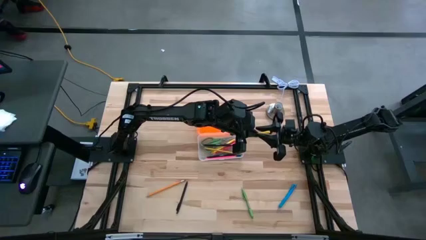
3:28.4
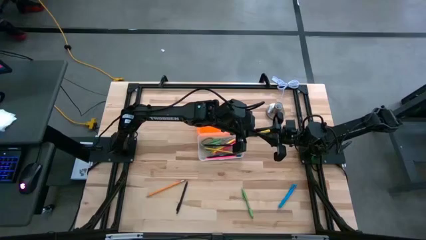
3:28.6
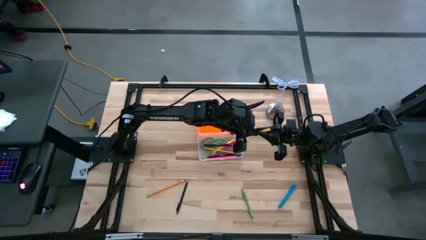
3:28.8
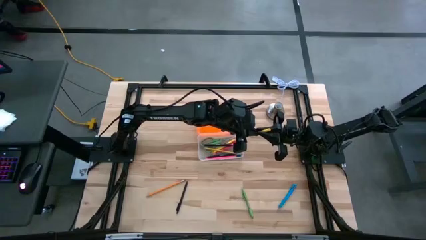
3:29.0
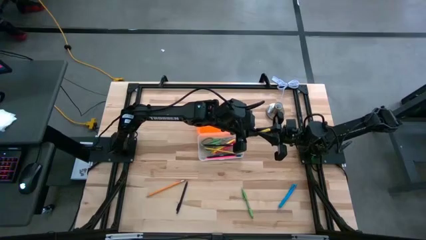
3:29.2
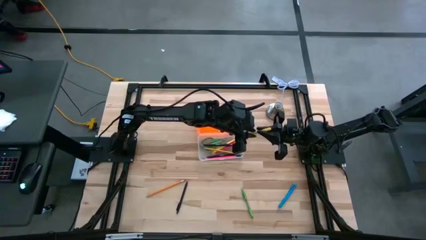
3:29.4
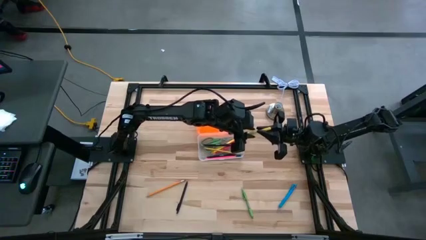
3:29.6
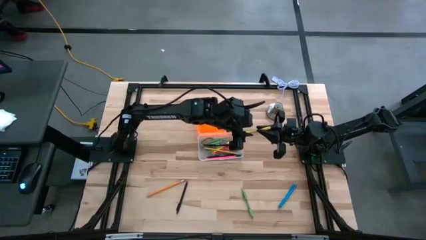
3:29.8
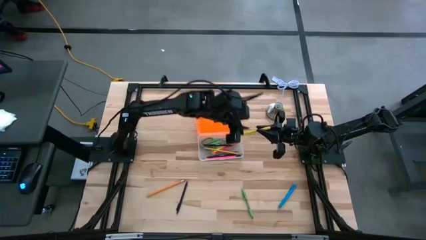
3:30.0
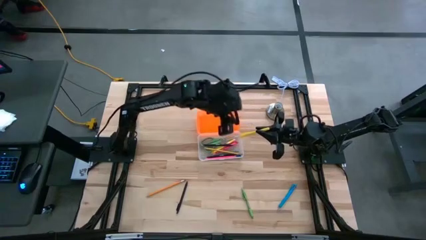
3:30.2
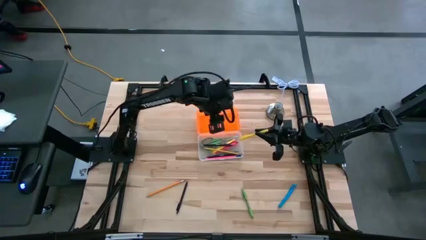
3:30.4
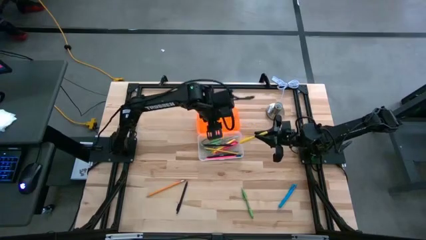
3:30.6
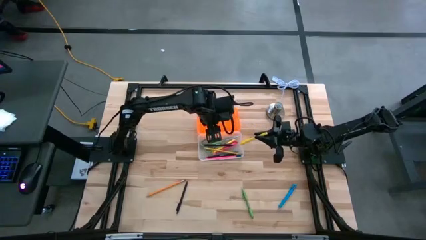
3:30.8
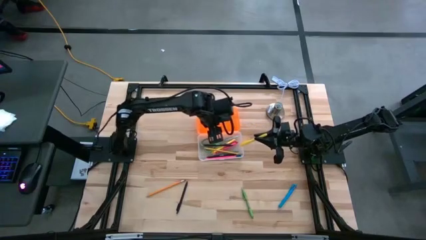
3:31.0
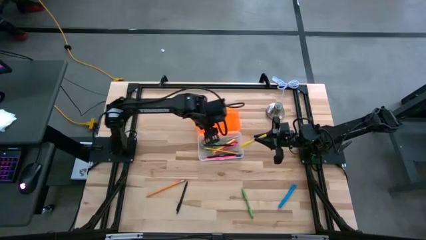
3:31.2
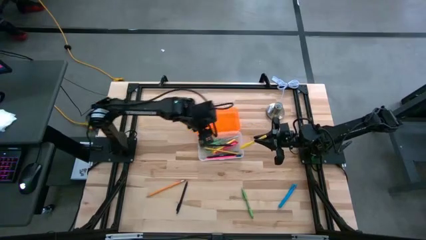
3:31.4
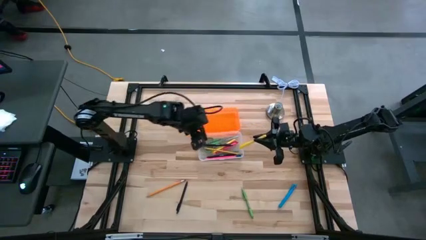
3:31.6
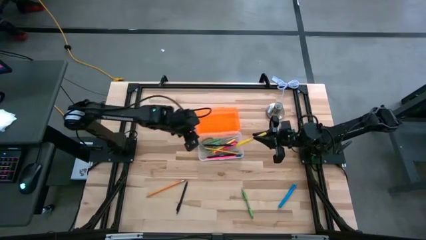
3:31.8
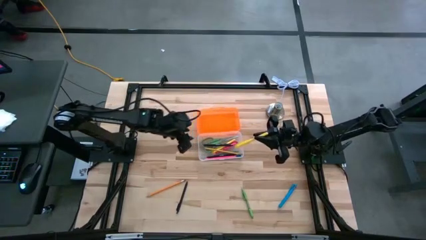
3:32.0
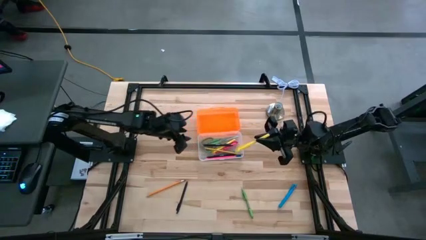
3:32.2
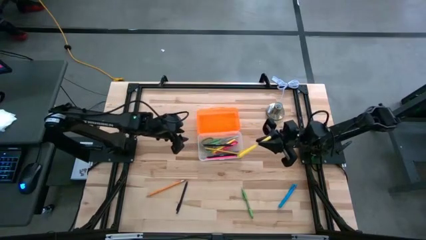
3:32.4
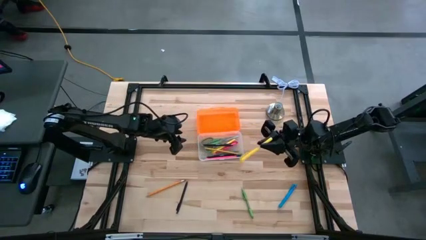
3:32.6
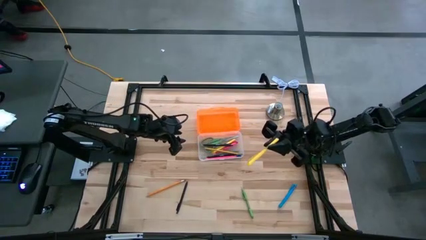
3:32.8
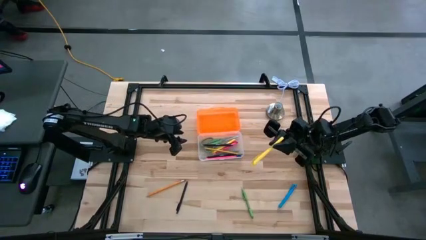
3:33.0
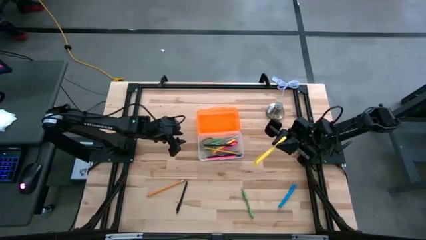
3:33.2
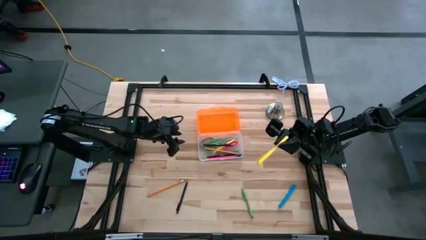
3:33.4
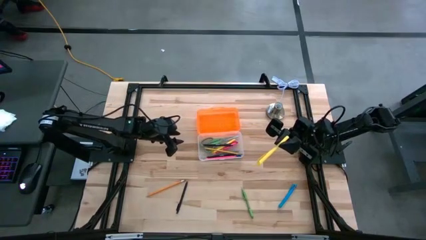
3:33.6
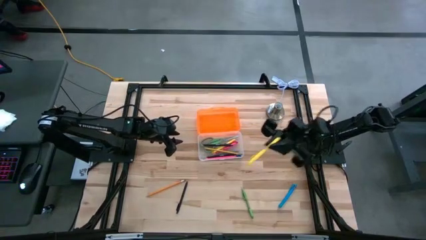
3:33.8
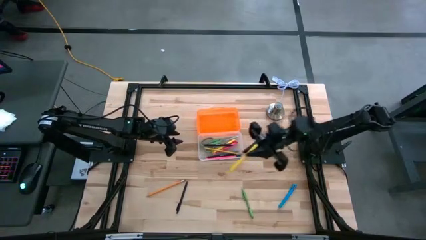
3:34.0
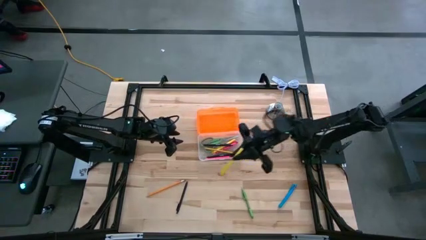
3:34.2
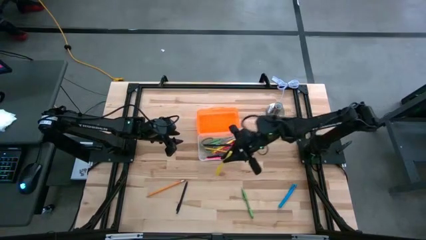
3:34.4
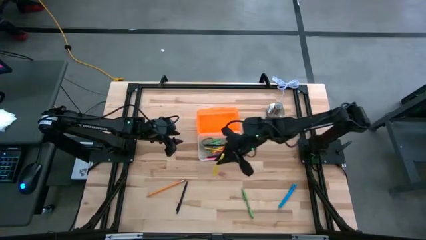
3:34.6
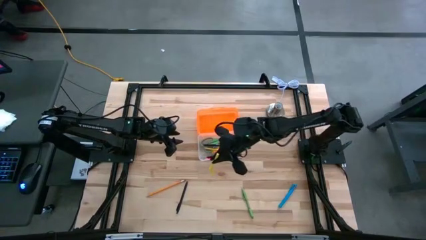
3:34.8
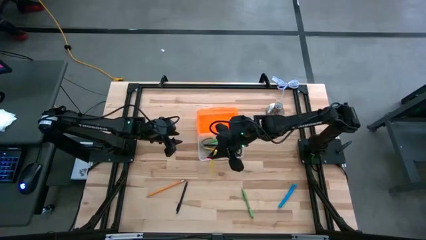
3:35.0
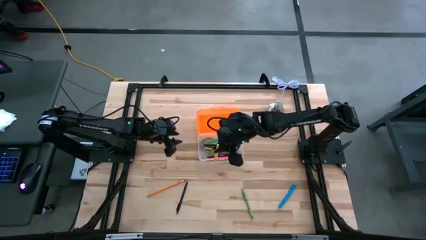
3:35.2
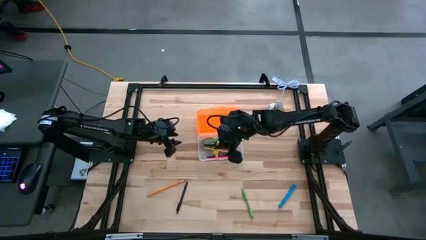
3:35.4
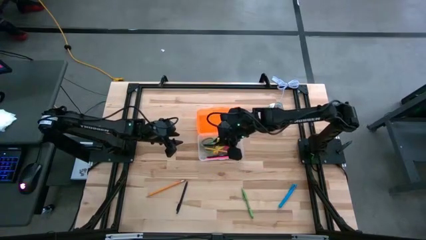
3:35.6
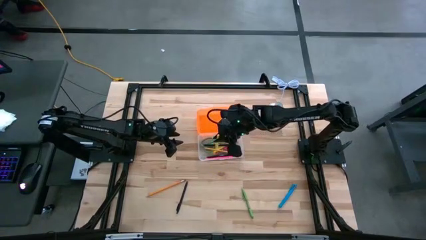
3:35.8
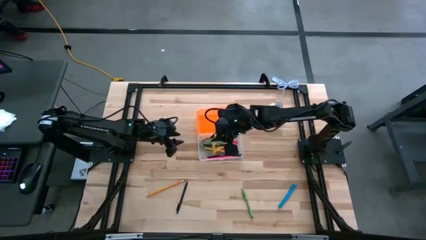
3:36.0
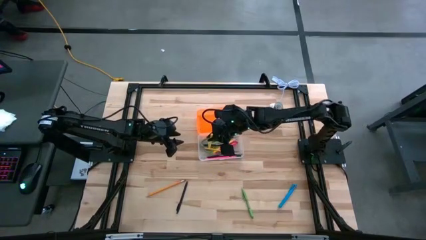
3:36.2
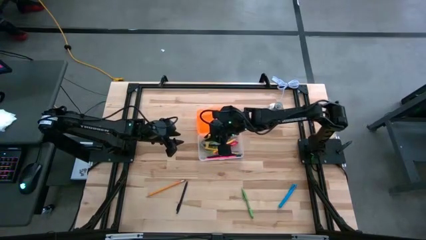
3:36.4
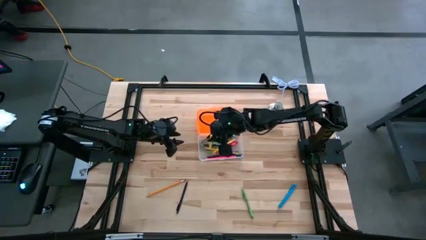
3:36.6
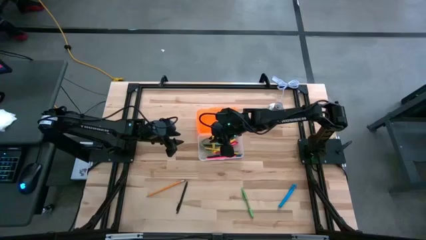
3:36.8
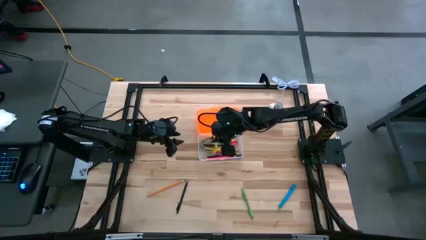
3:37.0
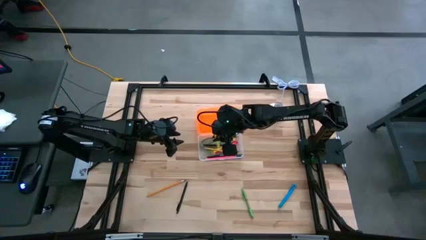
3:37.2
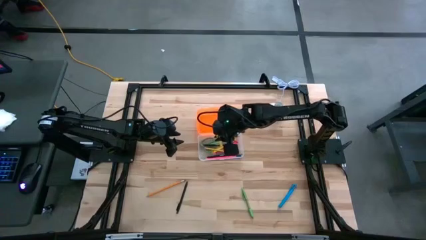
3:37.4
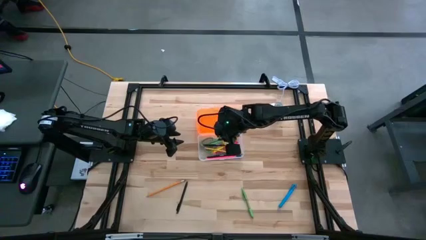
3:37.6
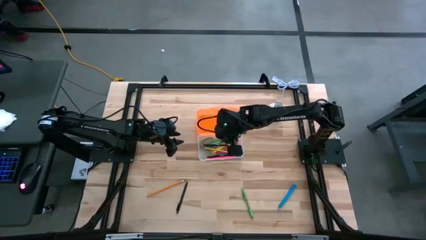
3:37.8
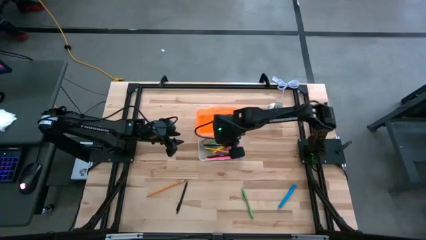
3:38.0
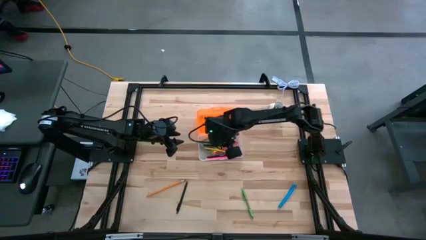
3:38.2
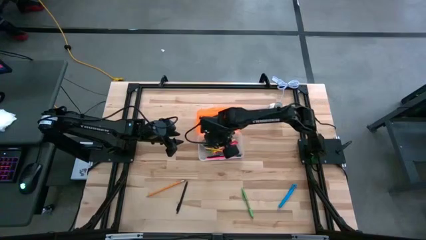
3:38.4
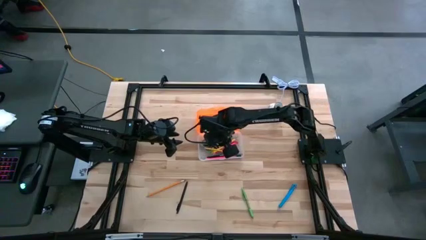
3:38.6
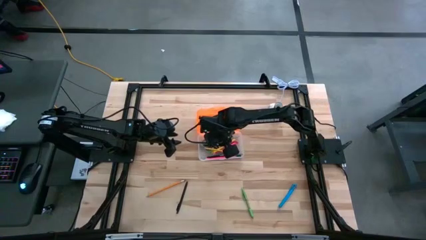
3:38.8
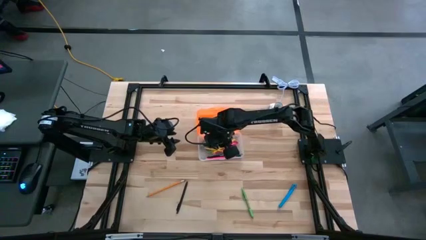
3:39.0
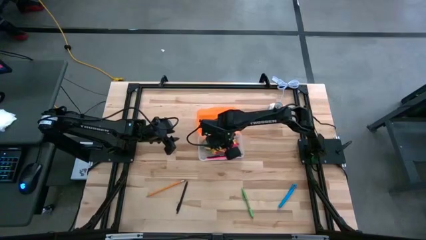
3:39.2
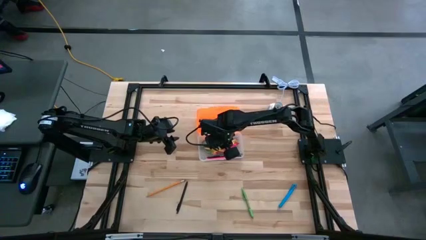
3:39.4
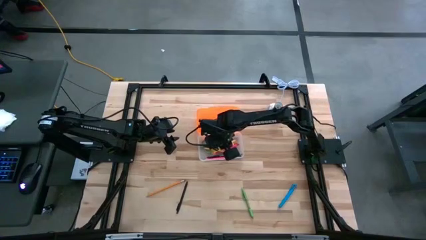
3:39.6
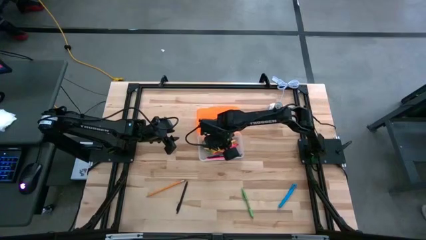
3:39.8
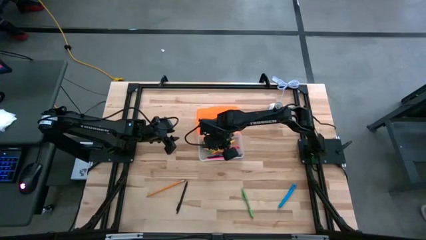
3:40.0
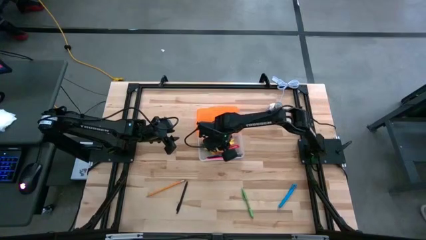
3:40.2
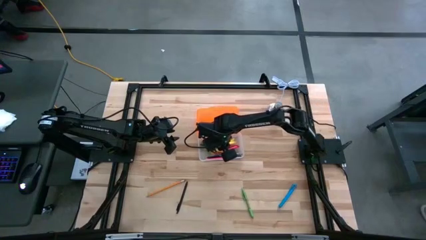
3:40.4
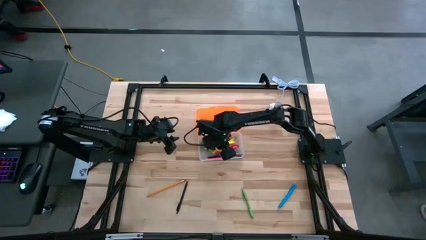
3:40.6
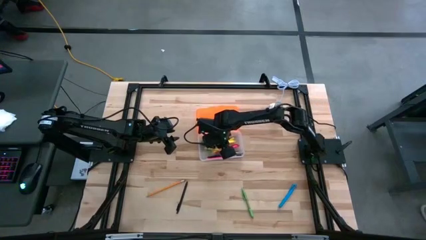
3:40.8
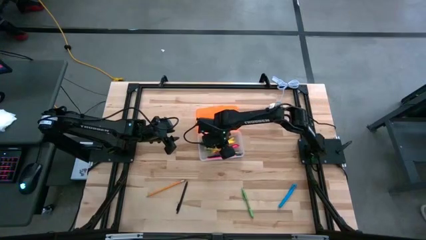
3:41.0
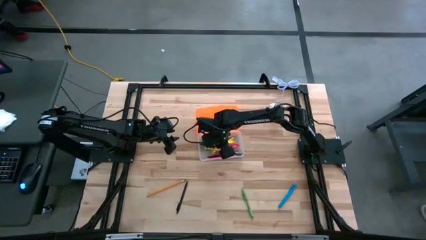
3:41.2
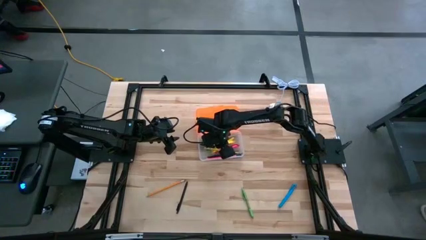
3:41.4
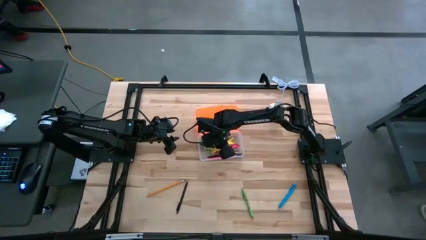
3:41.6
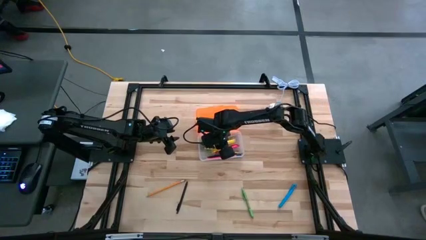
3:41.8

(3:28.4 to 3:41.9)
Task: Pick & place school supplies into a supply box
Put the yellow pen into the container

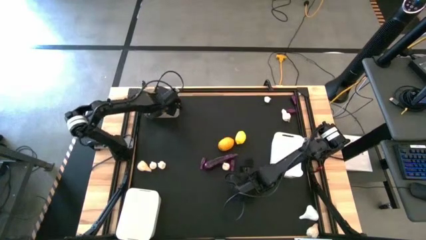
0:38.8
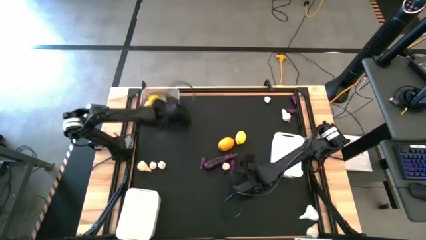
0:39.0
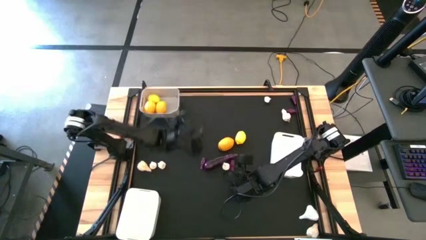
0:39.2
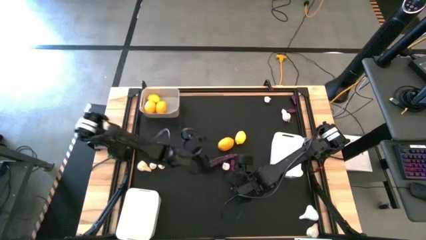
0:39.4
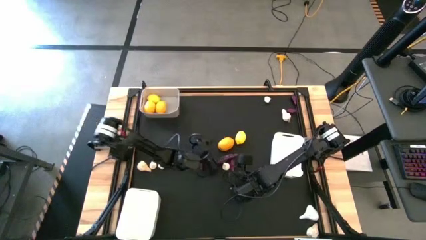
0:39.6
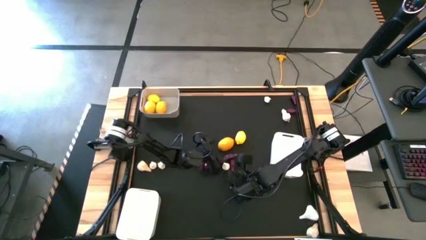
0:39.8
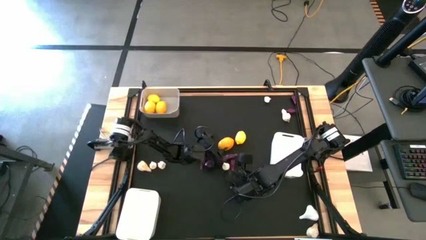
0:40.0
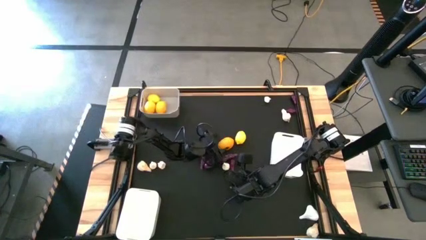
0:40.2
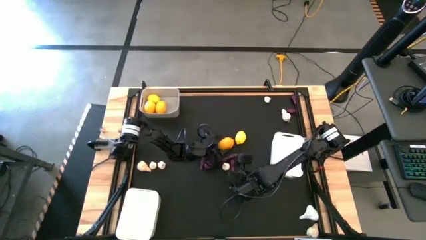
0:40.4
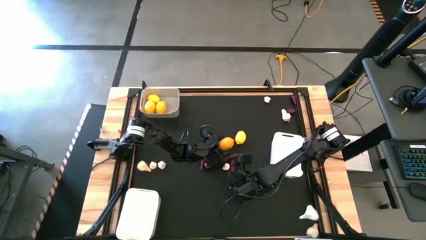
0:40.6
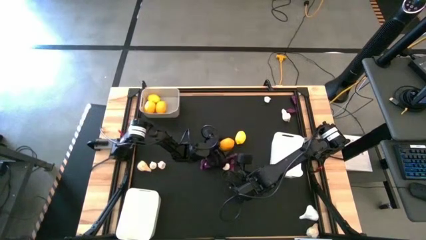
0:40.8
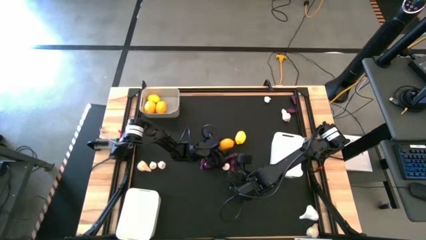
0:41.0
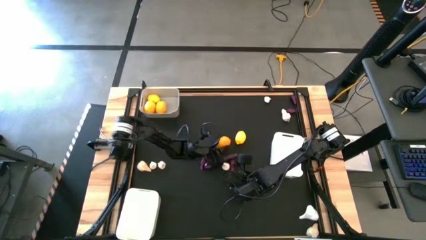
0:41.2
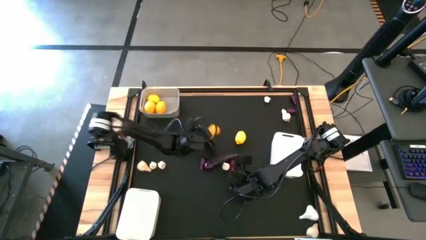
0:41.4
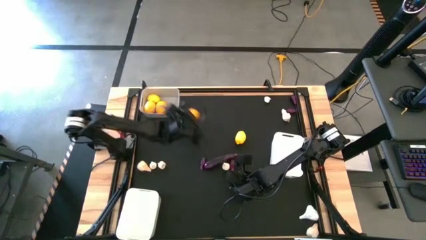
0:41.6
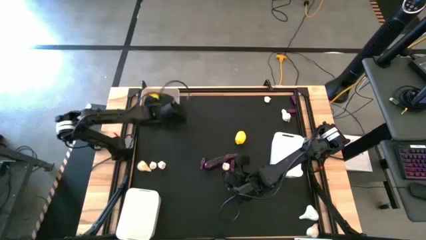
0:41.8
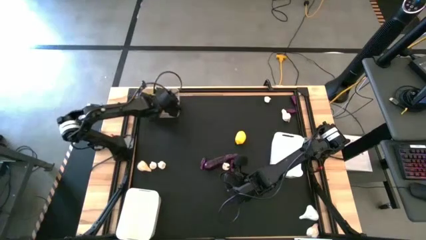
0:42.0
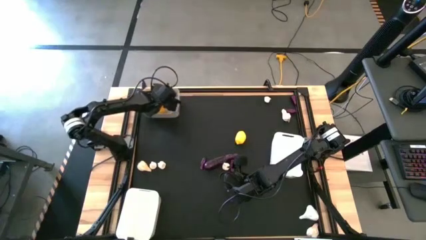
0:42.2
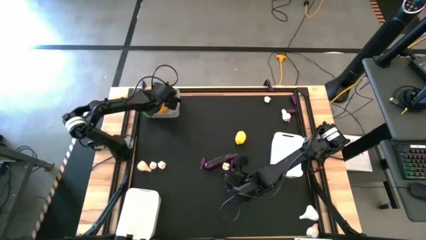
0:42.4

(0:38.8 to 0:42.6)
Task: Sort produce into baskets
Put the left lemon into the top white bin
